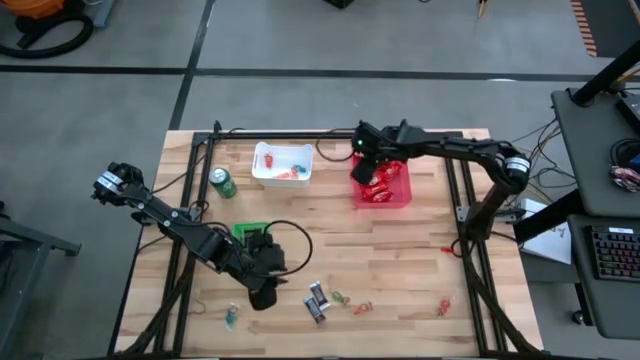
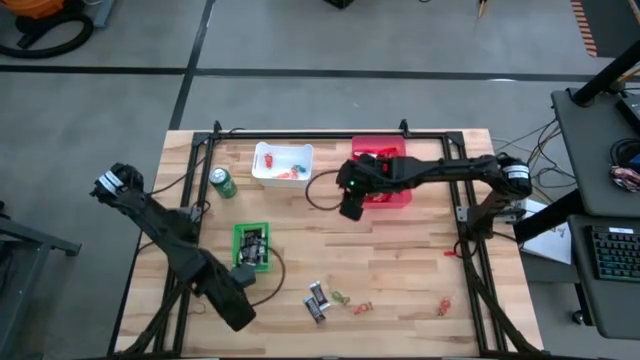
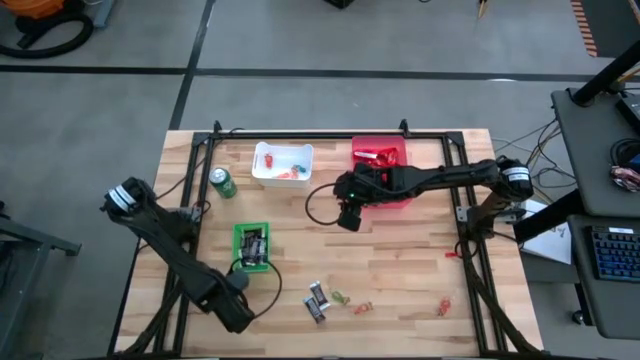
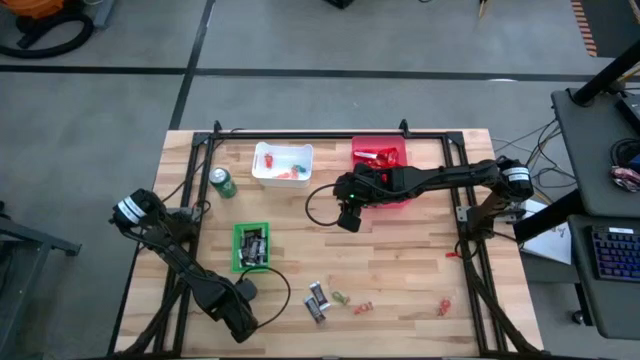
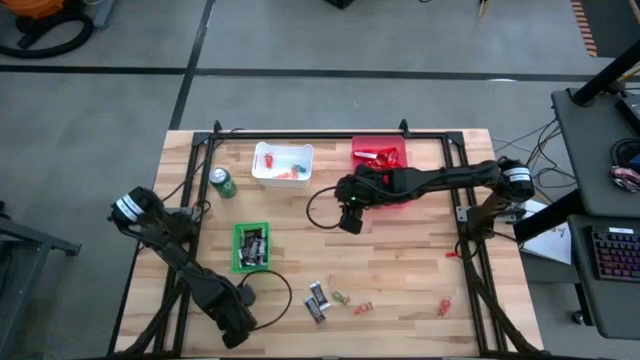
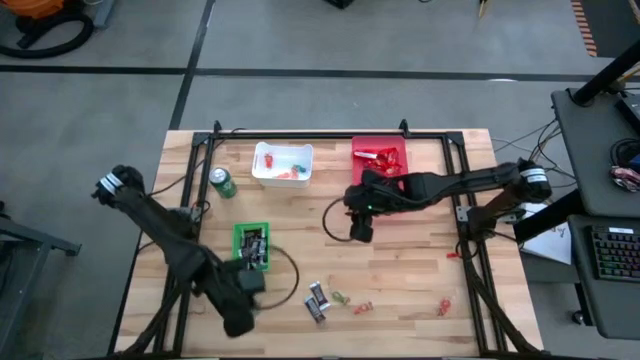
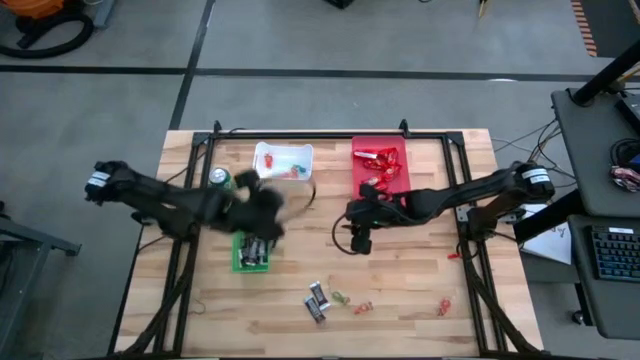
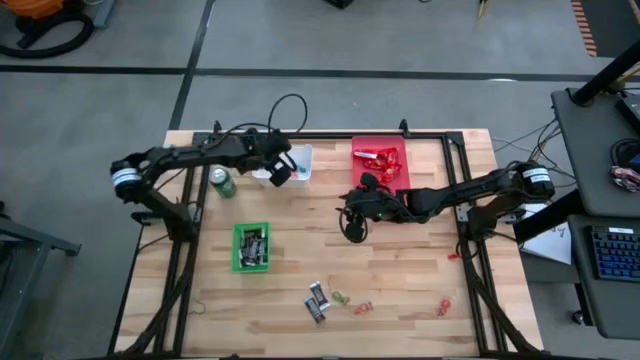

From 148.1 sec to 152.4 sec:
Task: Organize candy in baskets
Put the blue gummy into the white bin

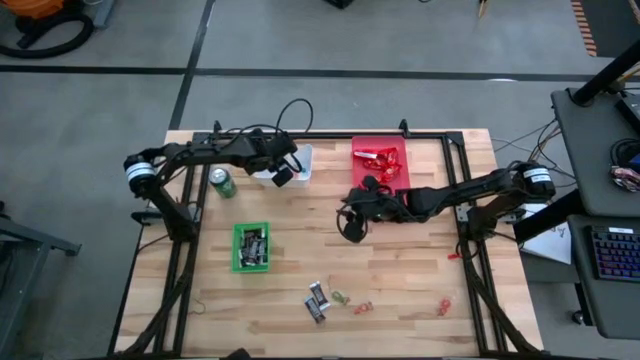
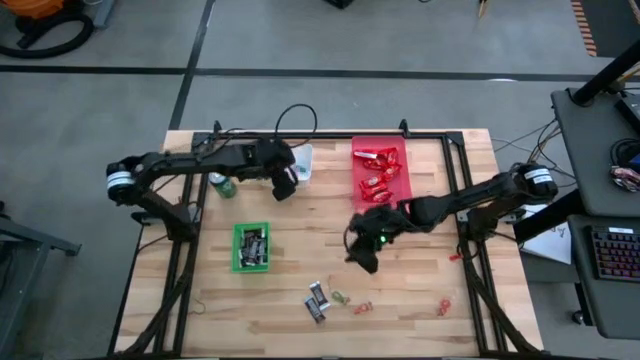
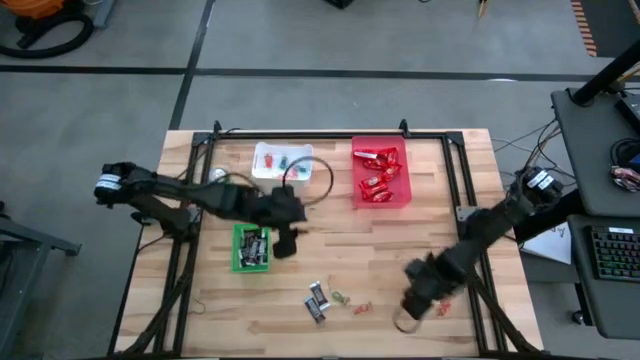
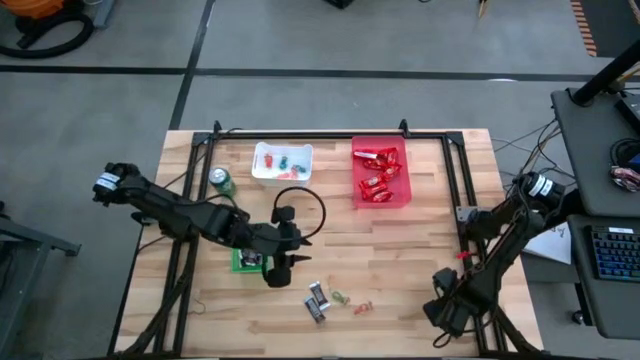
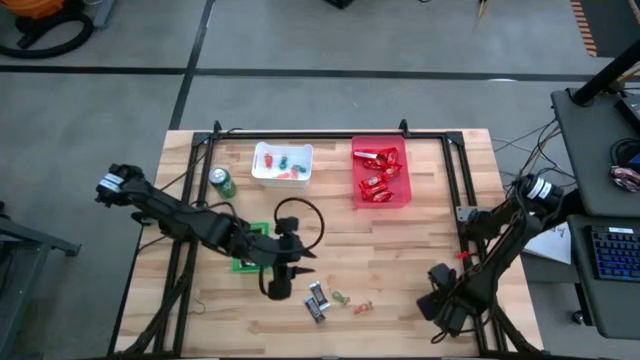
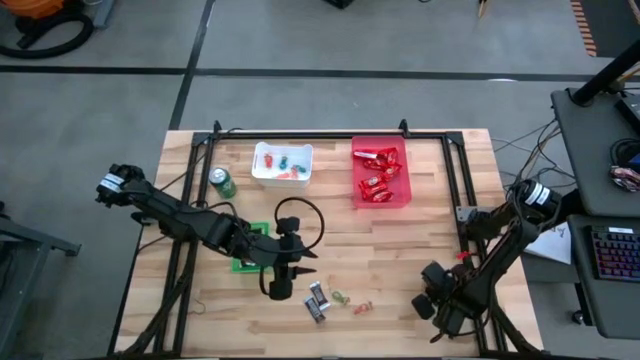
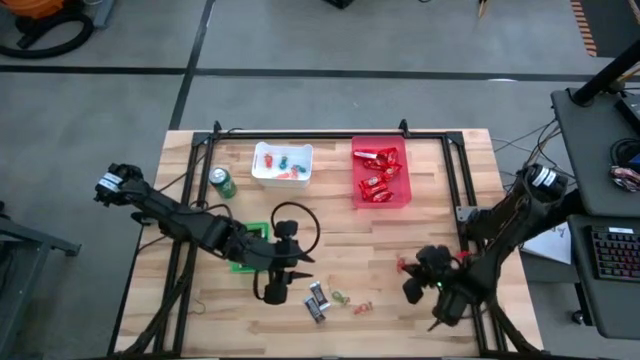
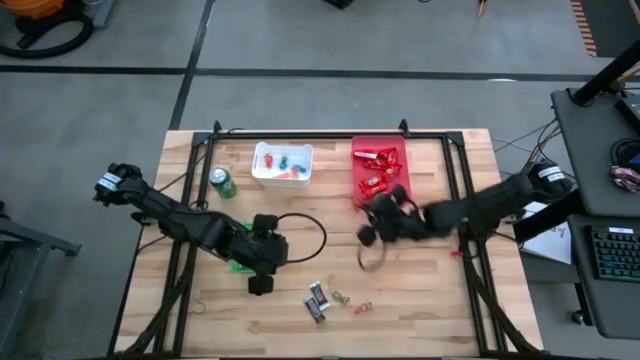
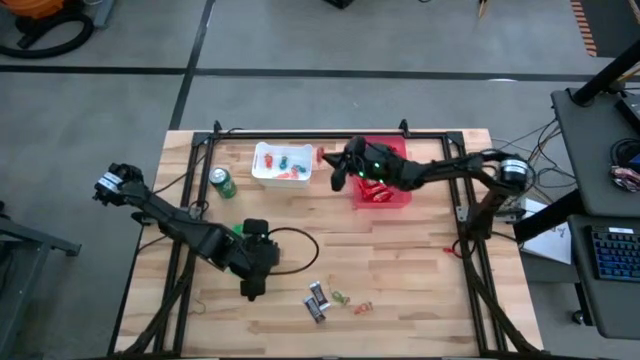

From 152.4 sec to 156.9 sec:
Put the red gummy into the white bin

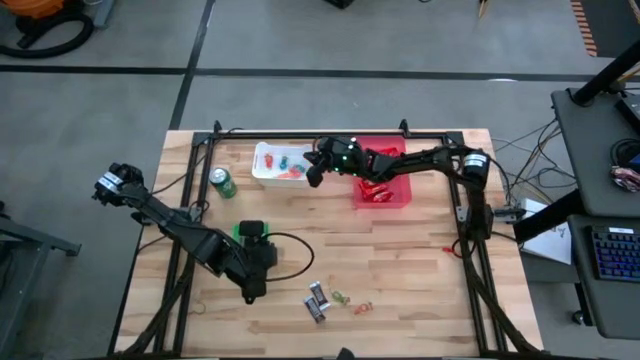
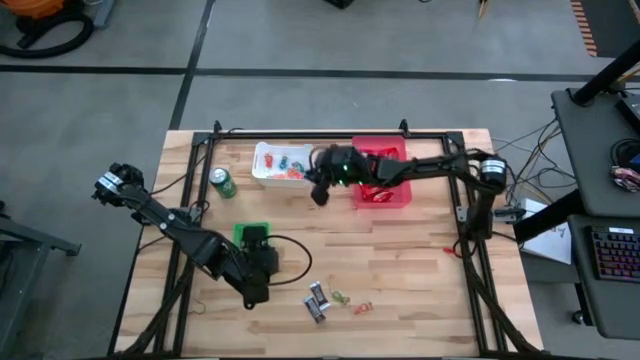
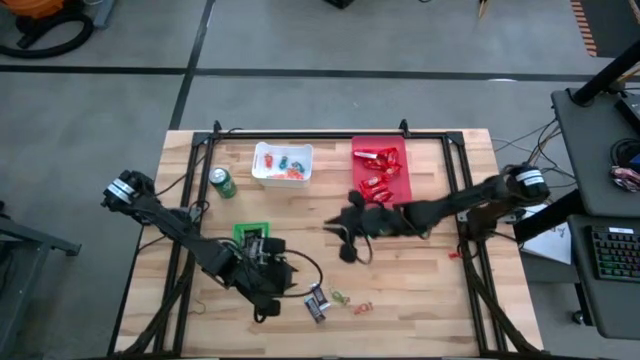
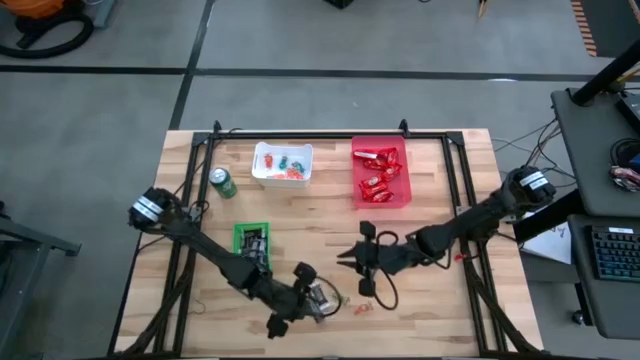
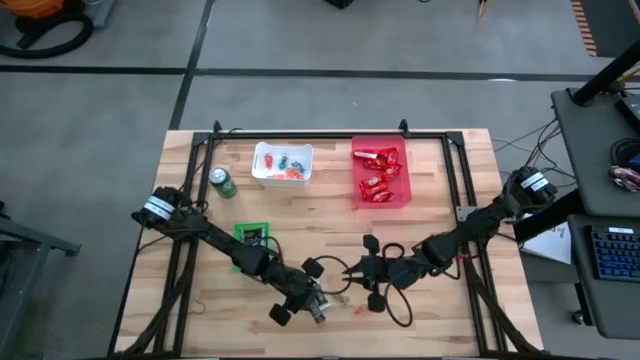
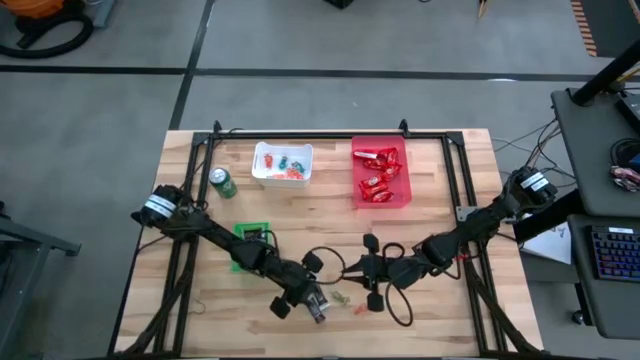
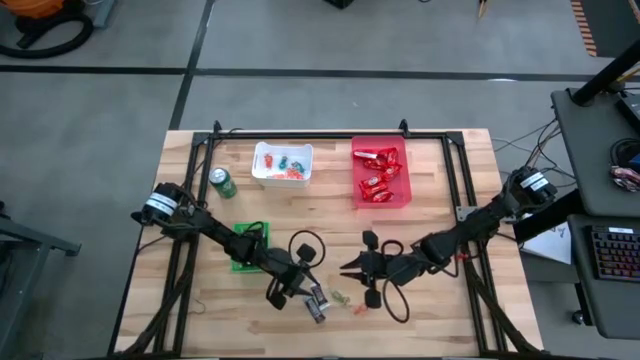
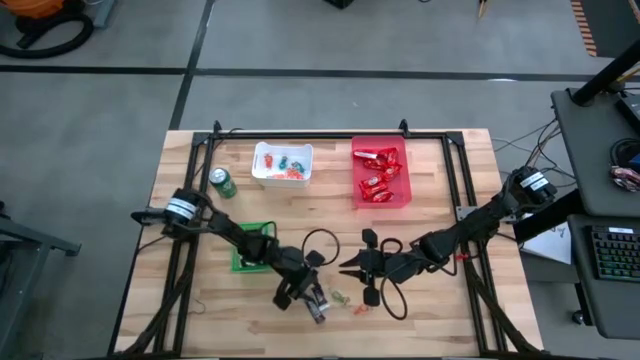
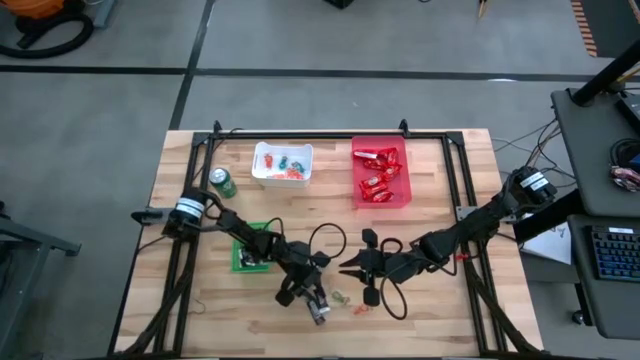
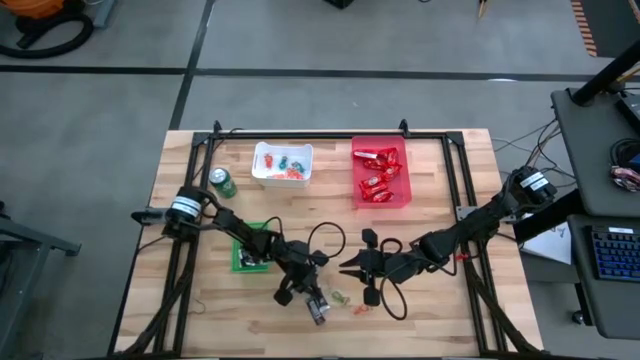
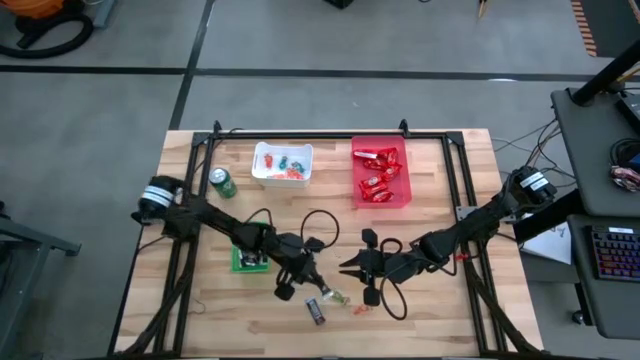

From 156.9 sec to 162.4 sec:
Put the brown chocolate into the green basket

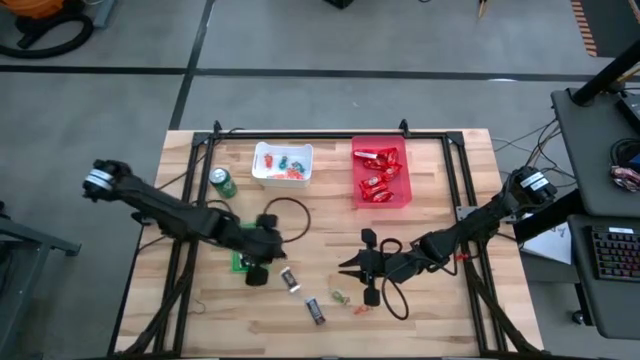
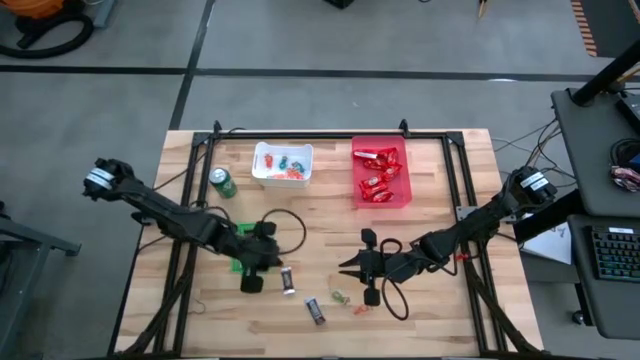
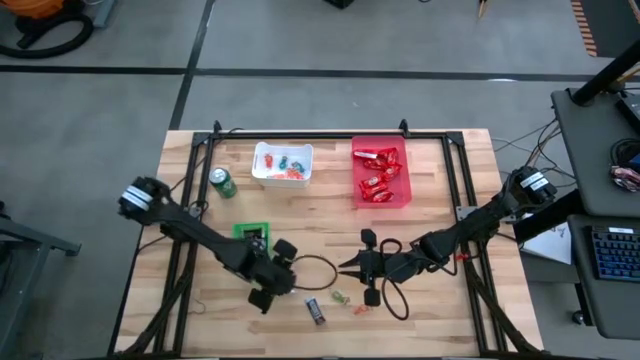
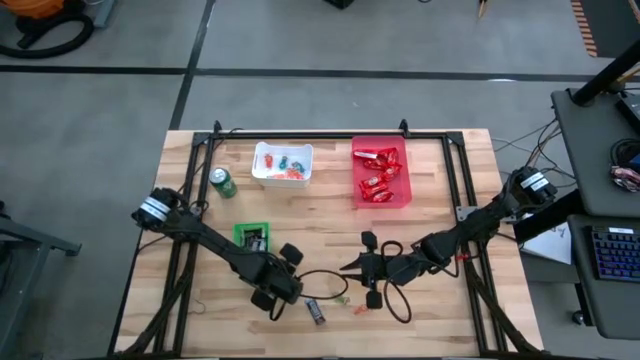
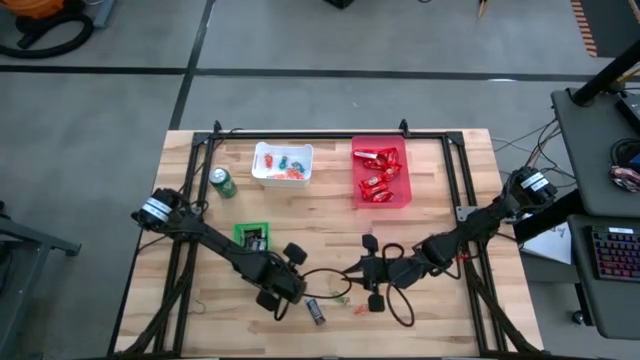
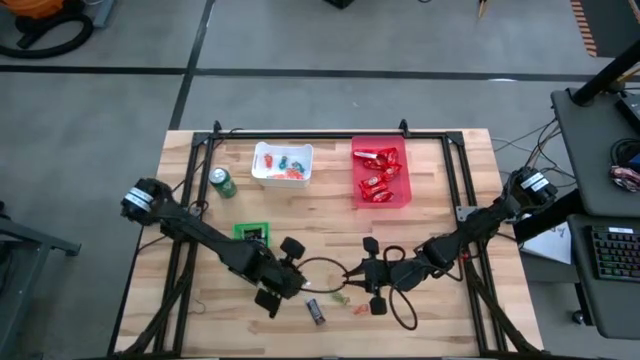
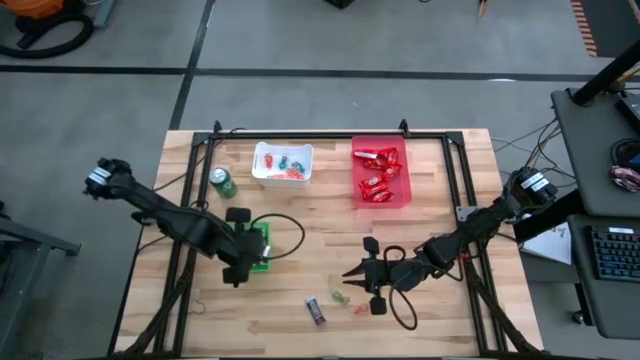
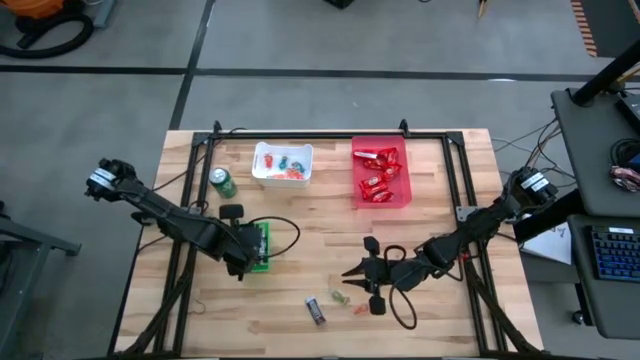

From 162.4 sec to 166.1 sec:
Put the brown chocolate into the green basket

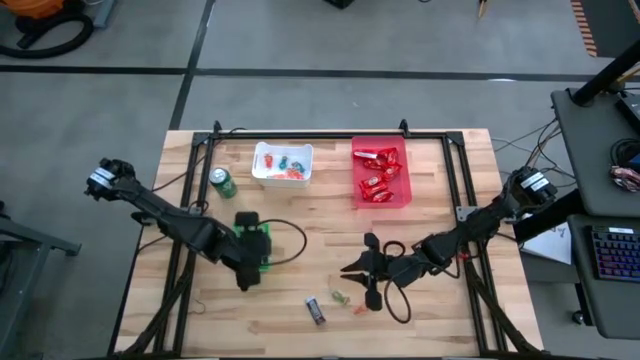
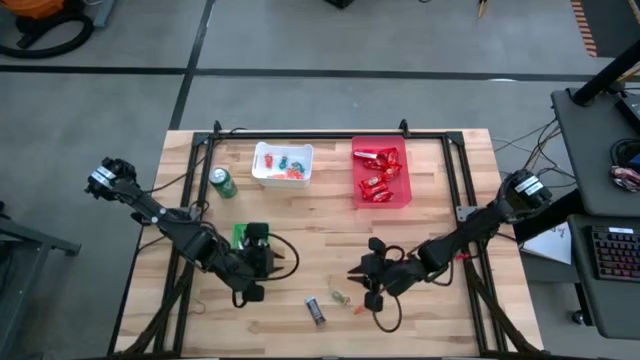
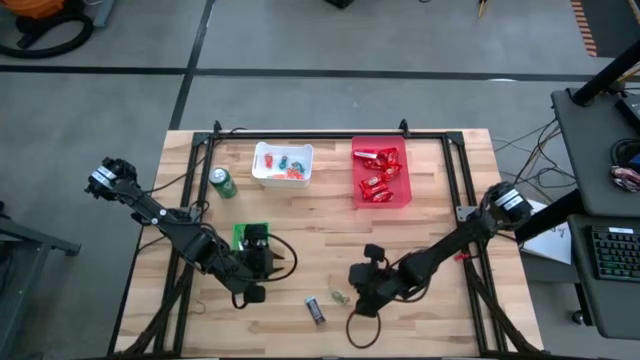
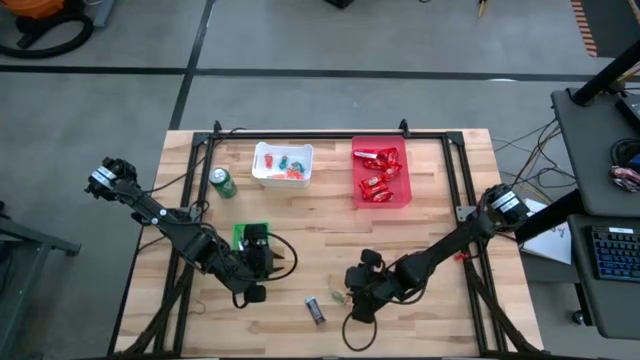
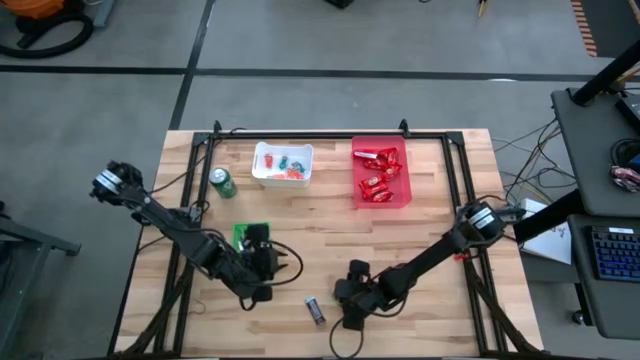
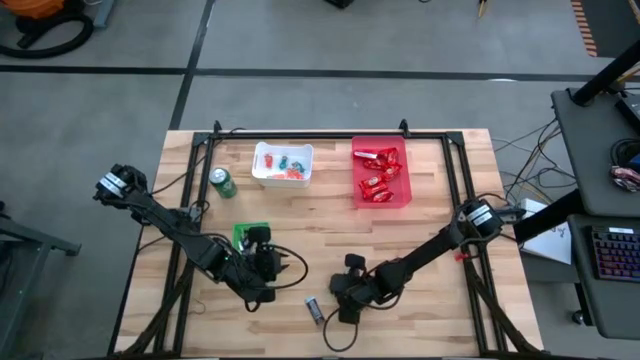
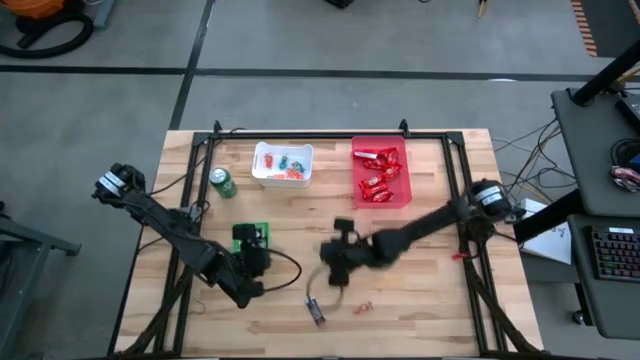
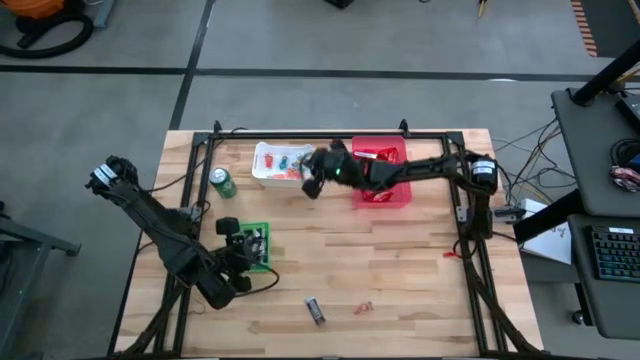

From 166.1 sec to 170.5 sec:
Put the green gummy into the white bin
